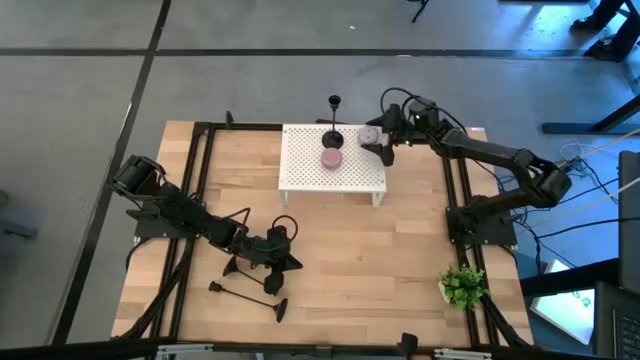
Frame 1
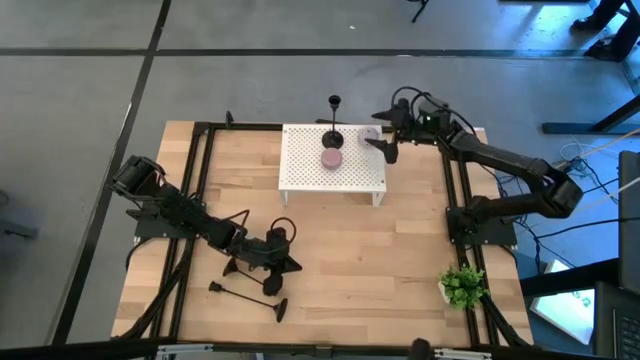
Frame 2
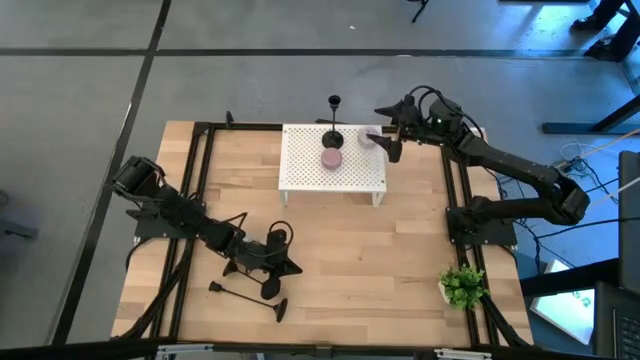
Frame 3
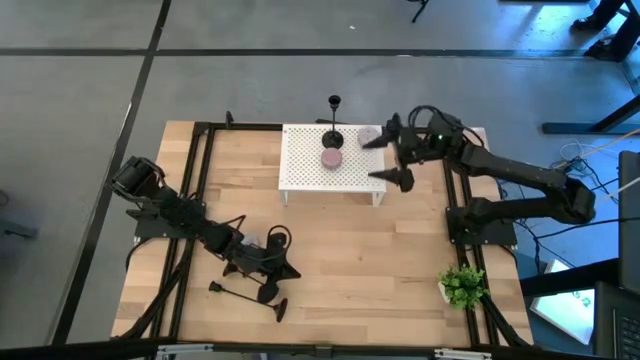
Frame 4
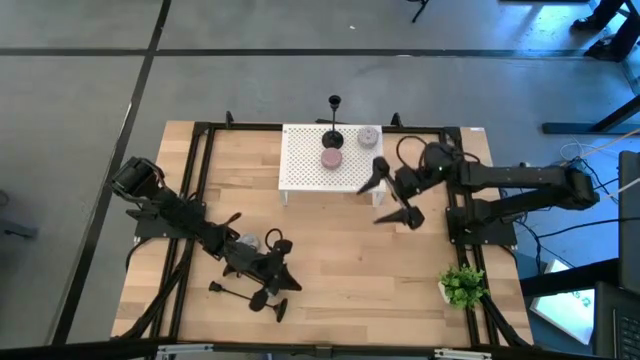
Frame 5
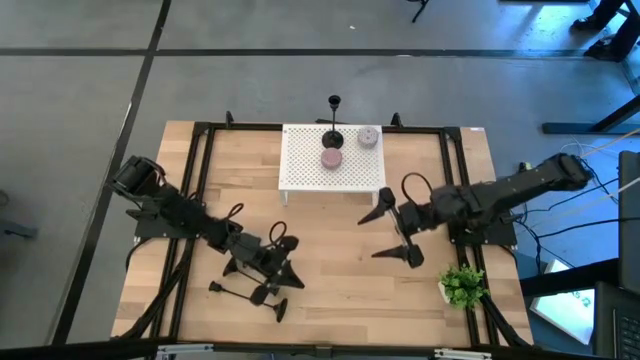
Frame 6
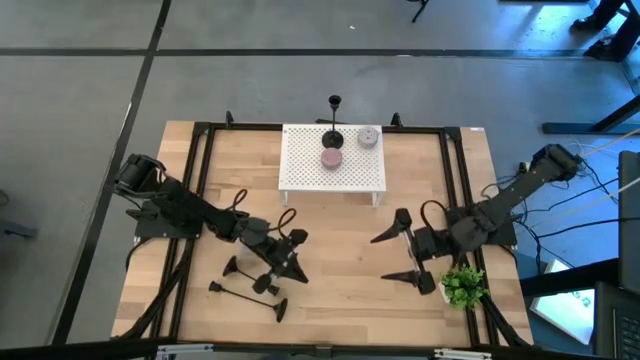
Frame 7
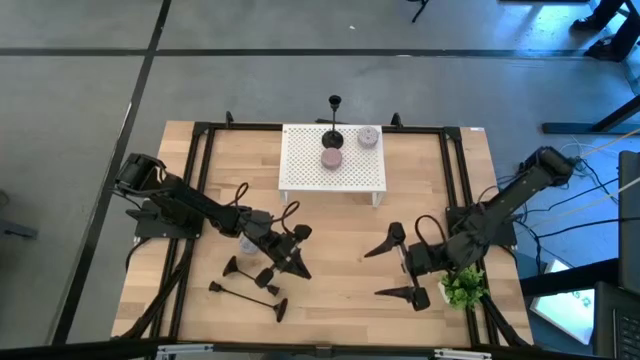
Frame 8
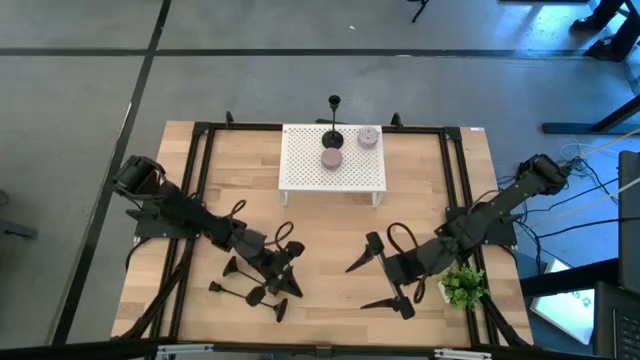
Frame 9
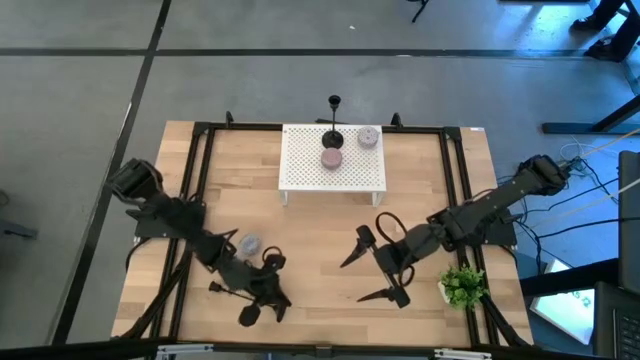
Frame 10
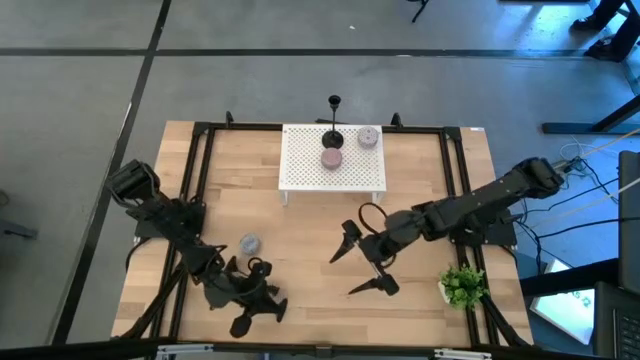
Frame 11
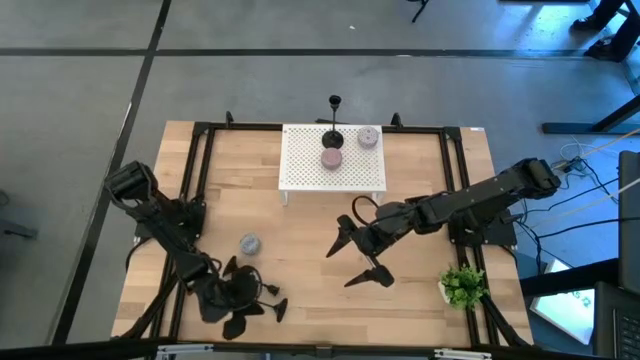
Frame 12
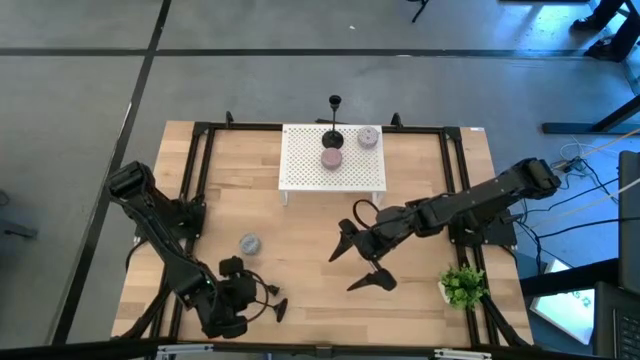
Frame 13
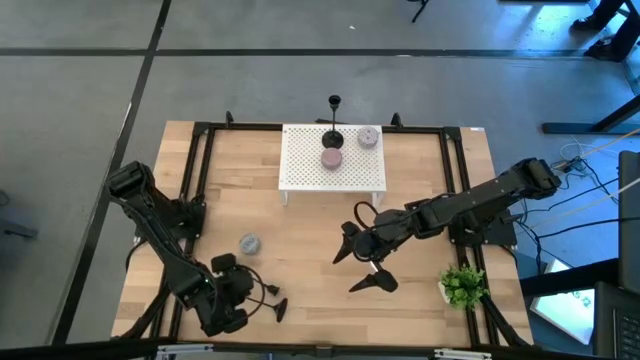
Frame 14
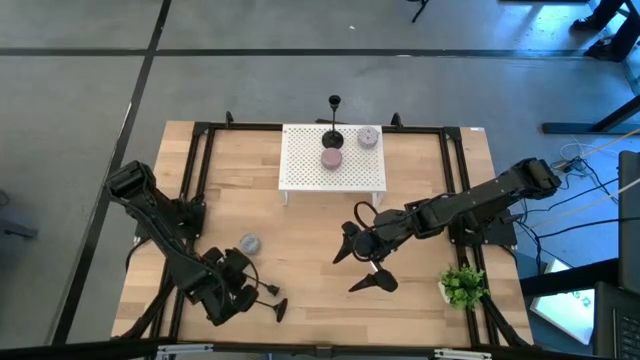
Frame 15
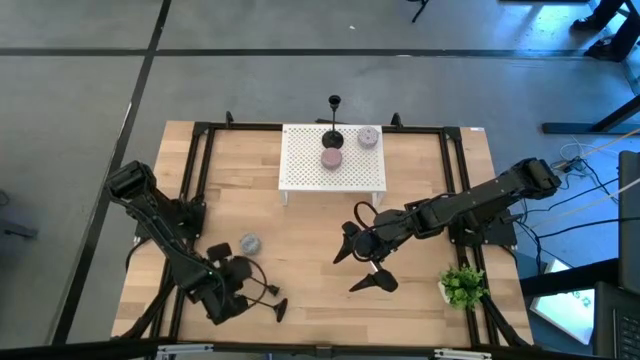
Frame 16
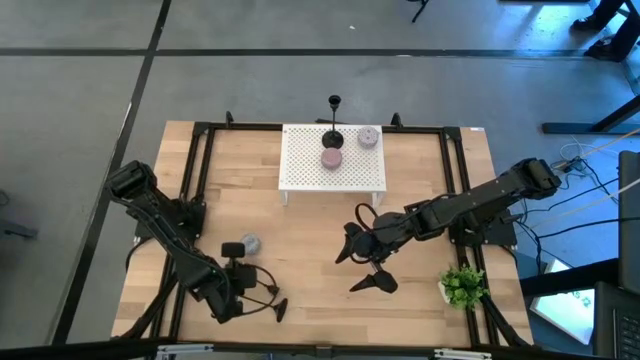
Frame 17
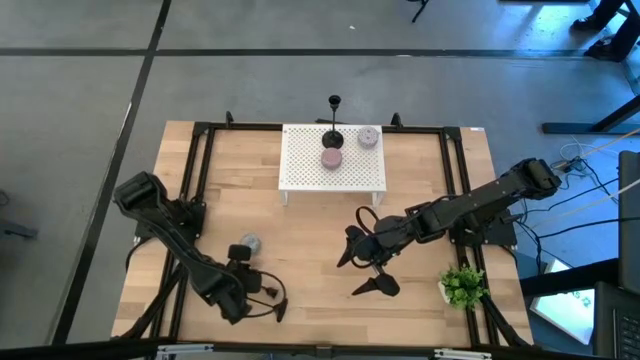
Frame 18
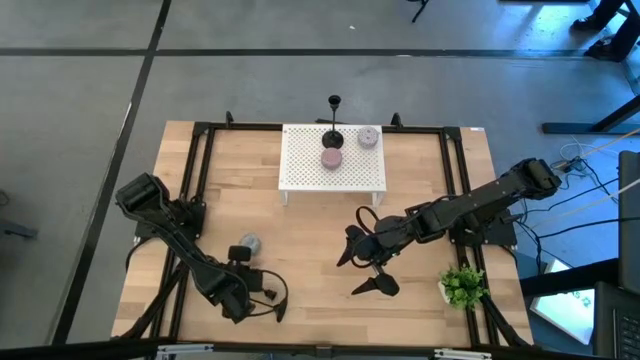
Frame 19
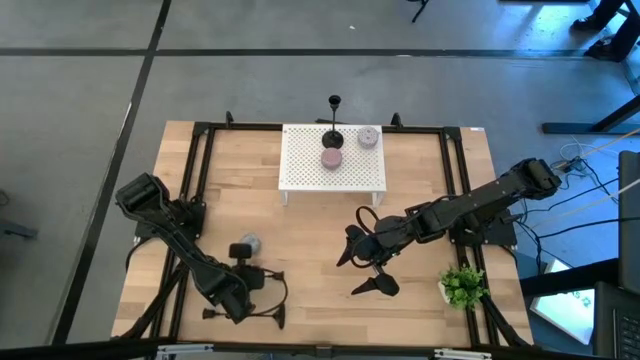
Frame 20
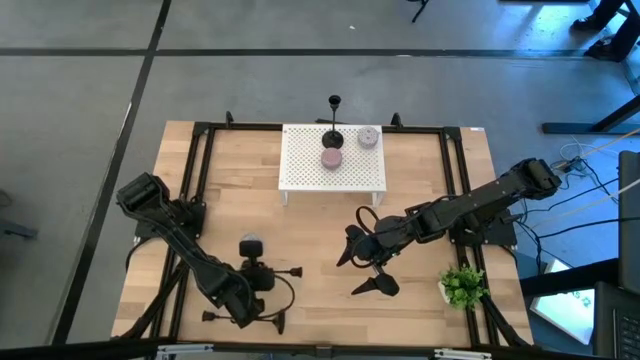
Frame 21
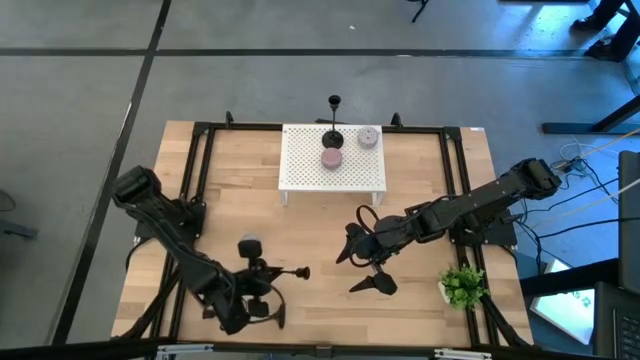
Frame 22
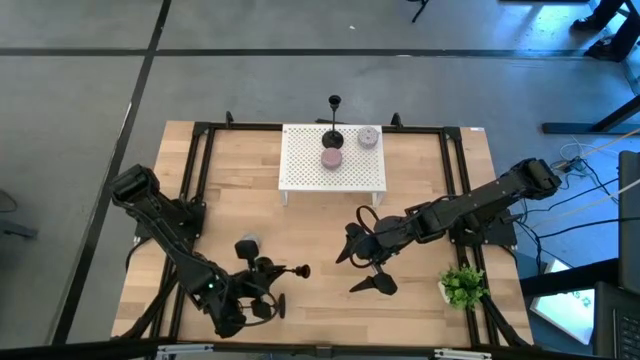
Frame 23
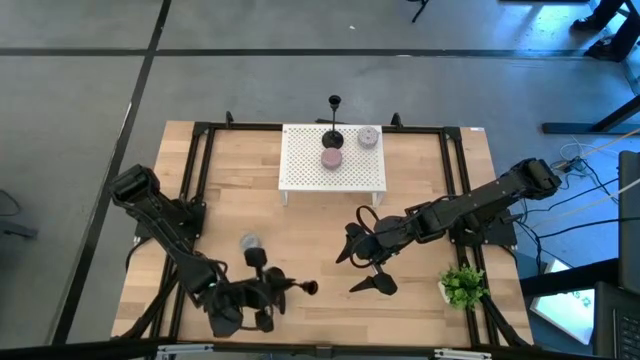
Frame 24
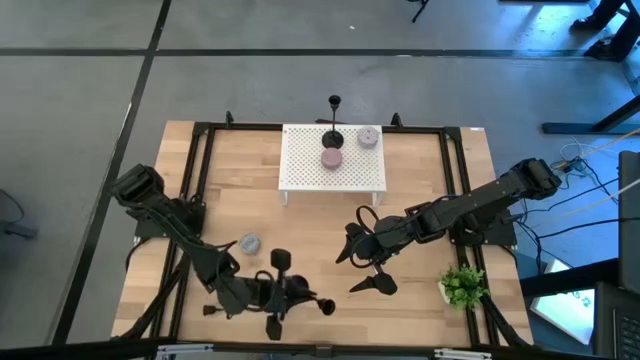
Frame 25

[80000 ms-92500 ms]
Task: Pick & Place candle stick holders
Put the top black candle holder on the shelf

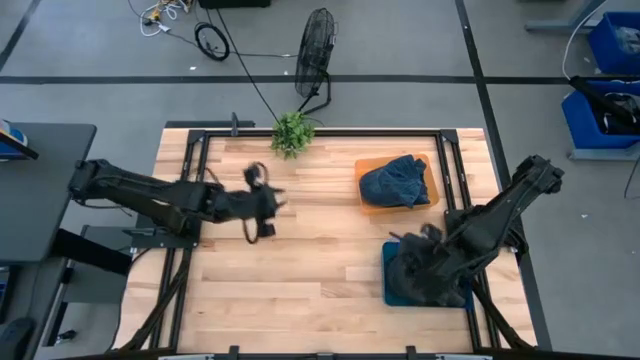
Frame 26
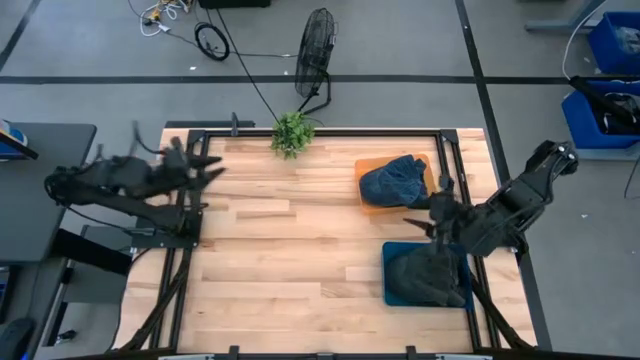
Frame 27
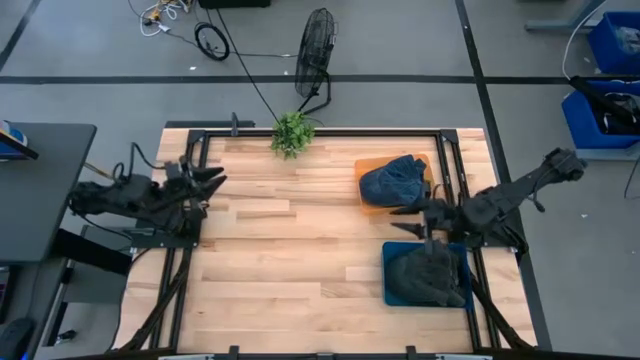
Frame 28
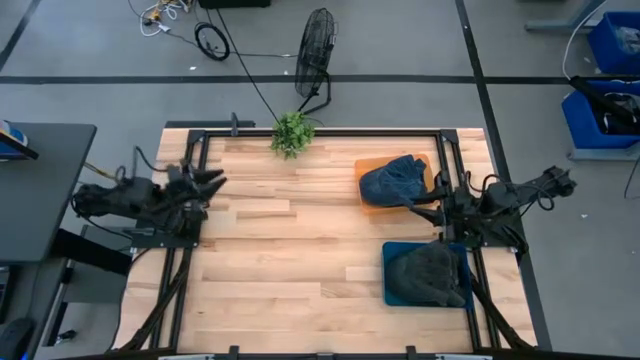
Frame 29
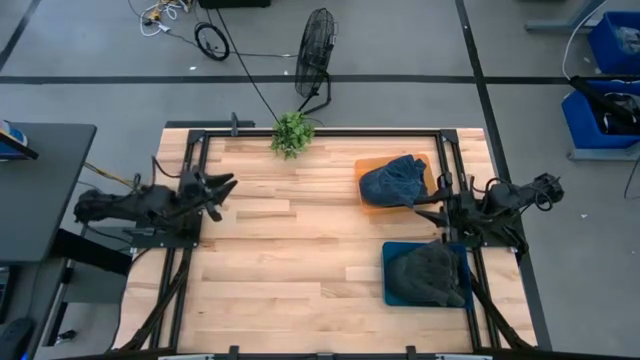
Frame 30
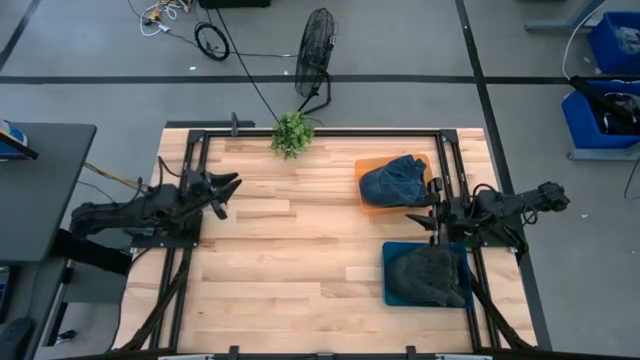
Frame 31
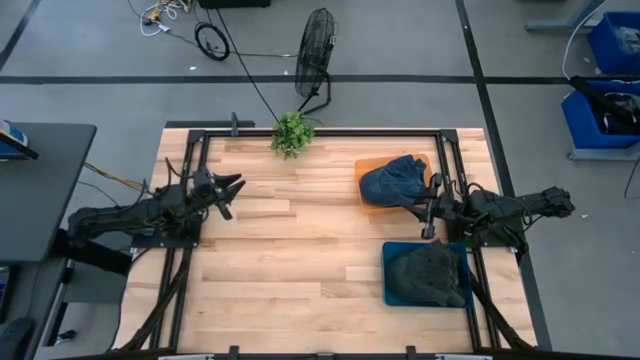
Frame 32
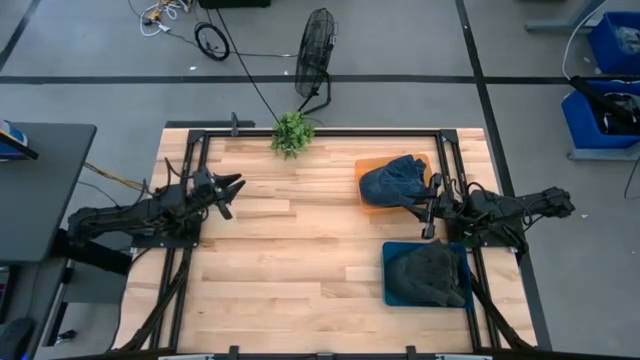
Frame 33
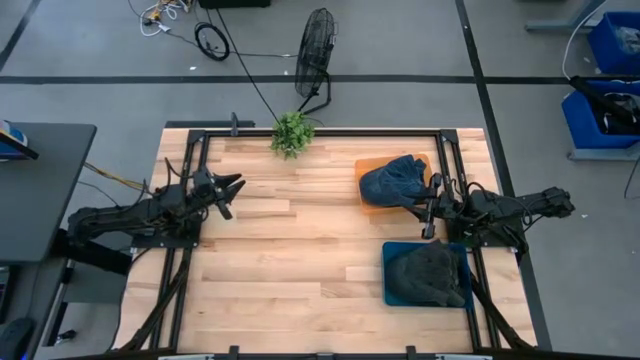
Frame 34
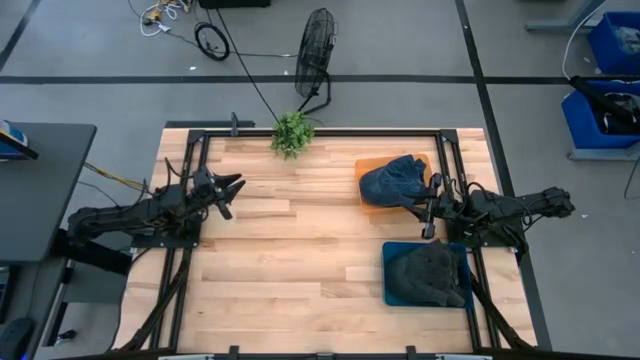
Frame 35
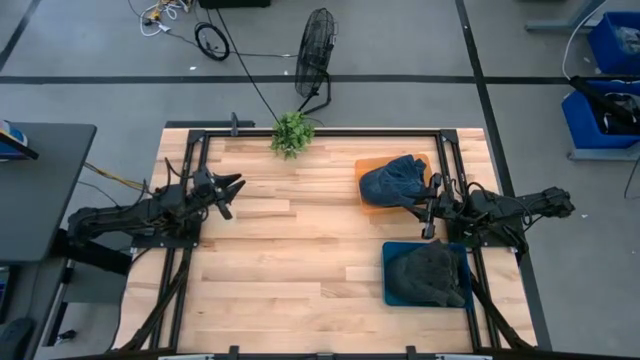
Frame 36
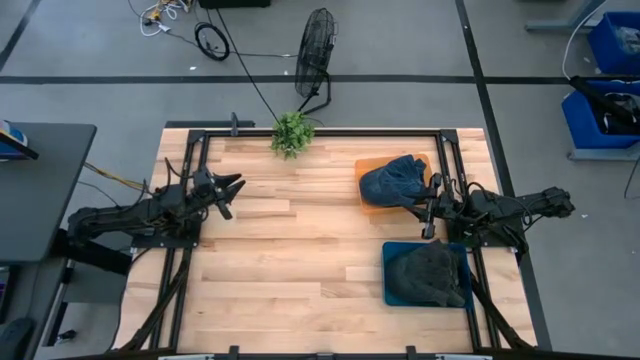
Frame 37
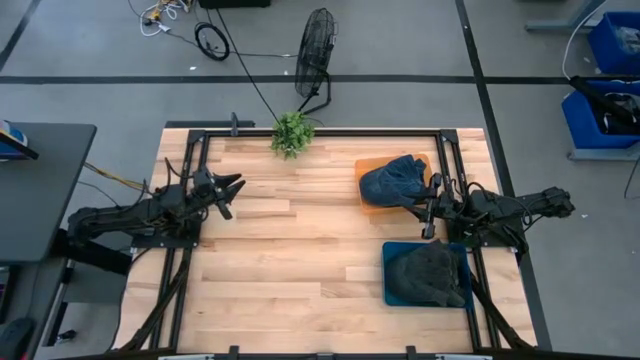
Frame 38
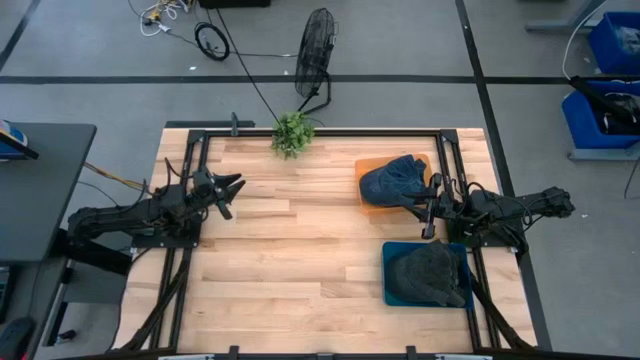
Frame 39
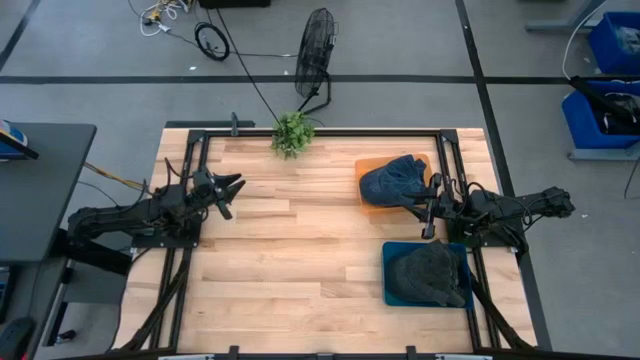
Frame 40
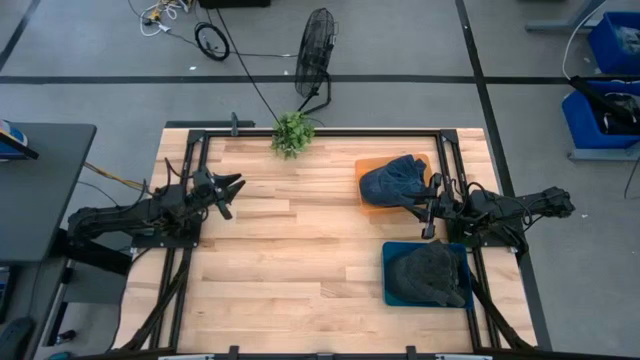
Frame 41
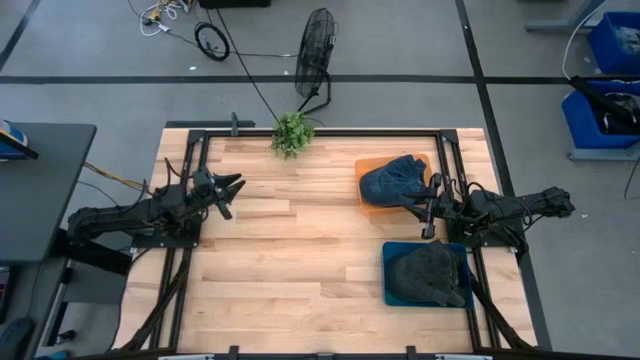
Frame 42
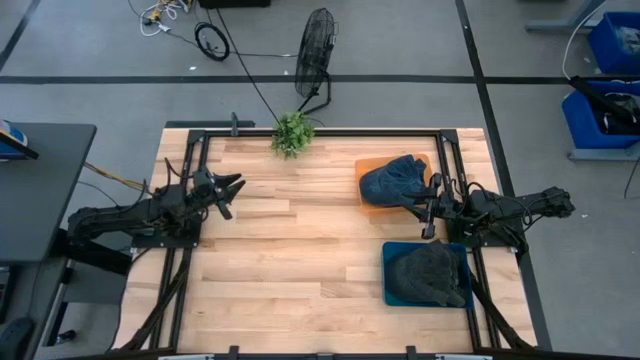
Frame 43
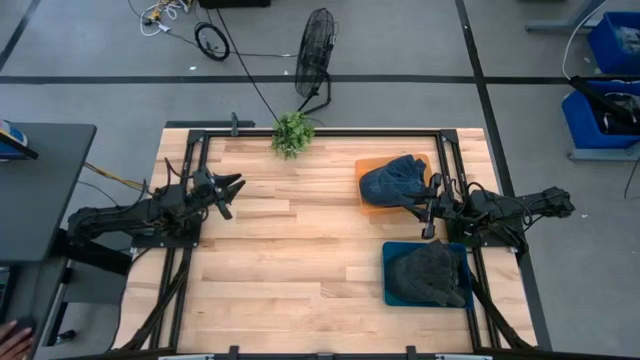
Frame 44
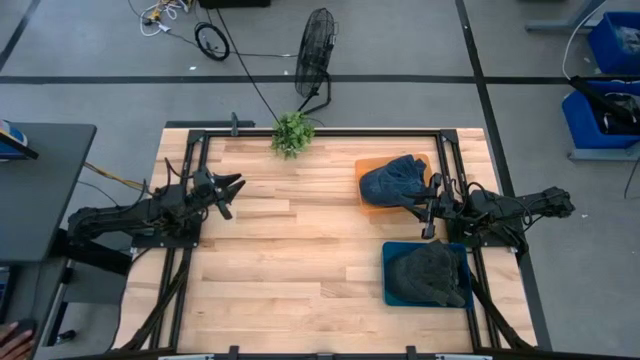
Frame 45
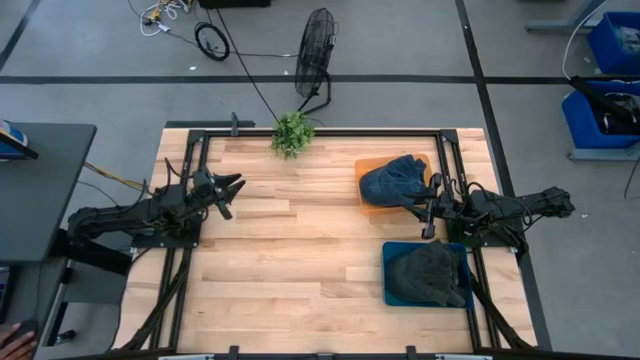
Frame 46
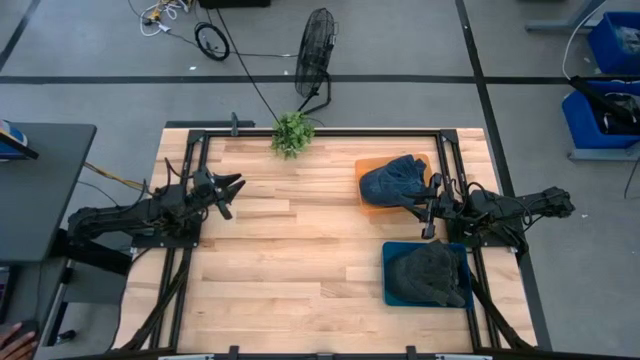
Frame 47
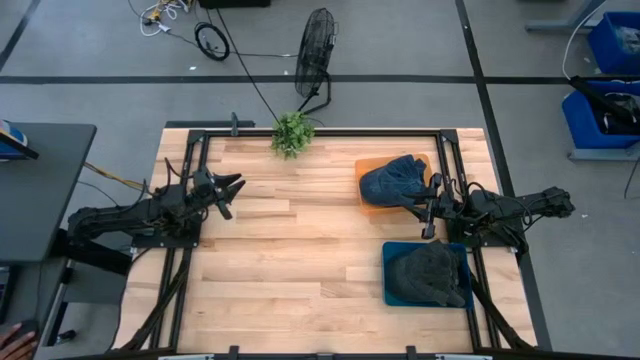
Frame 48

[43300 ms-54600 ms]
Task: Pick & Place hat
Return to Home Position
